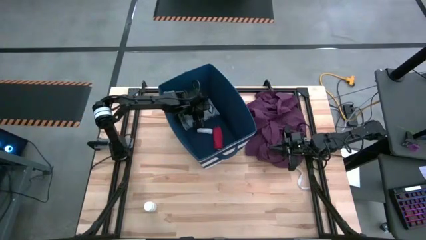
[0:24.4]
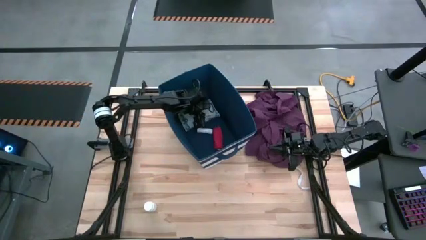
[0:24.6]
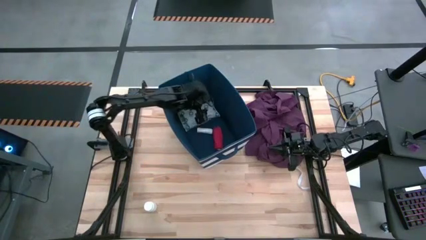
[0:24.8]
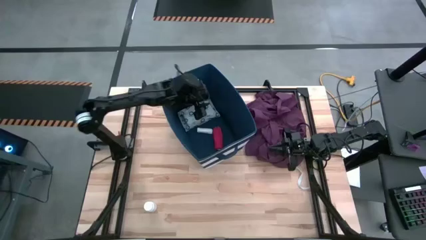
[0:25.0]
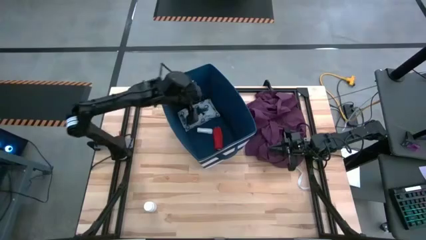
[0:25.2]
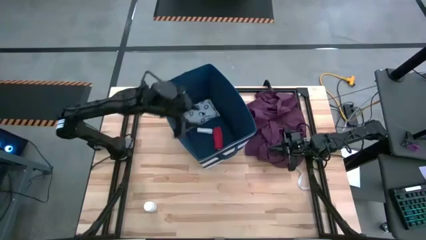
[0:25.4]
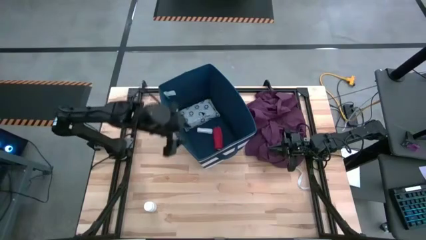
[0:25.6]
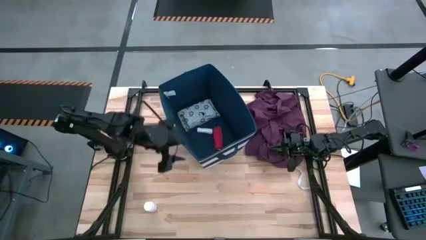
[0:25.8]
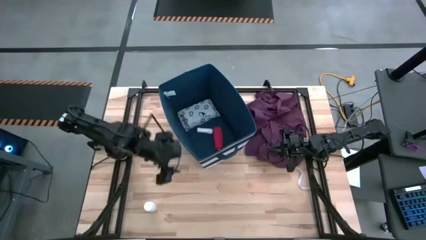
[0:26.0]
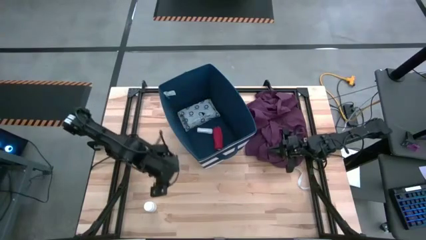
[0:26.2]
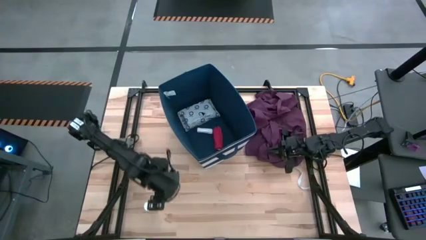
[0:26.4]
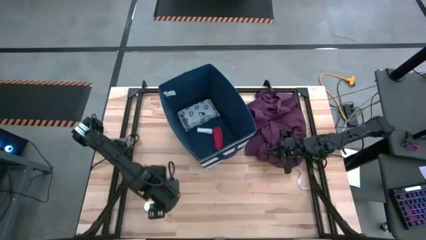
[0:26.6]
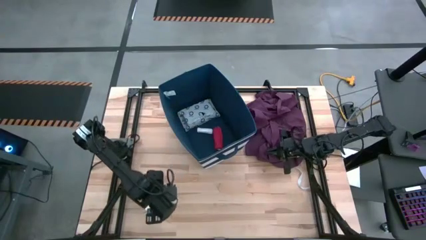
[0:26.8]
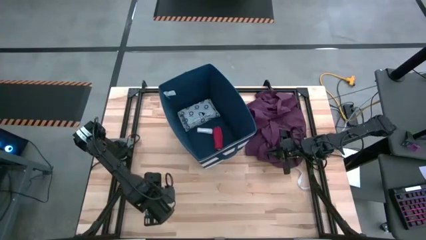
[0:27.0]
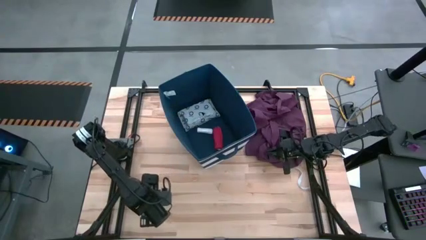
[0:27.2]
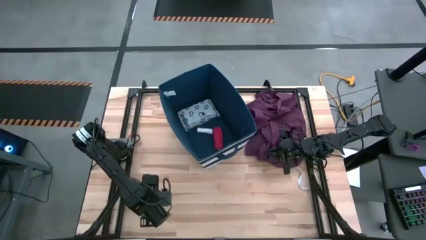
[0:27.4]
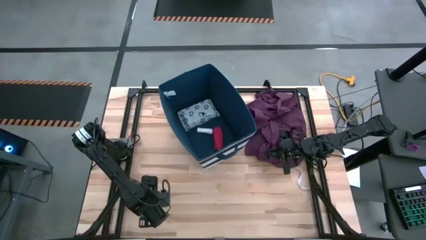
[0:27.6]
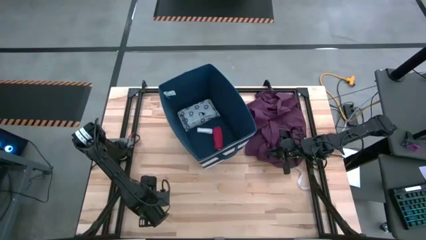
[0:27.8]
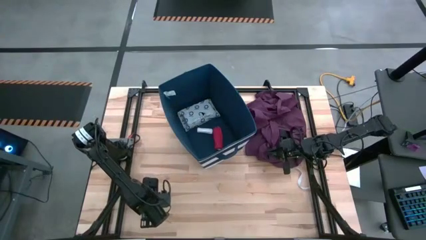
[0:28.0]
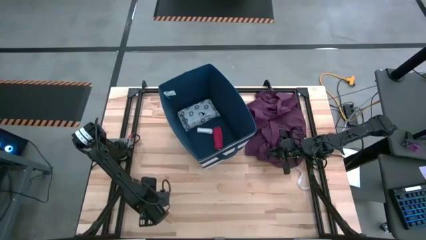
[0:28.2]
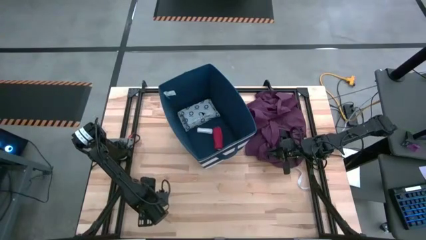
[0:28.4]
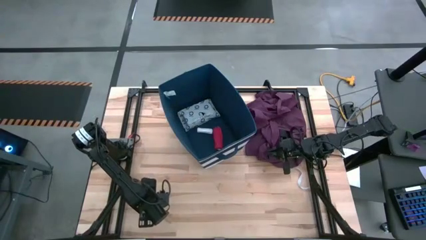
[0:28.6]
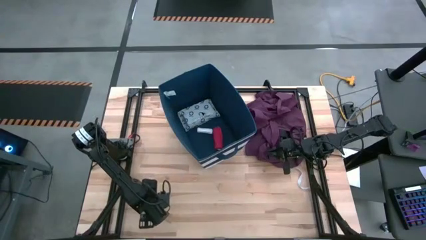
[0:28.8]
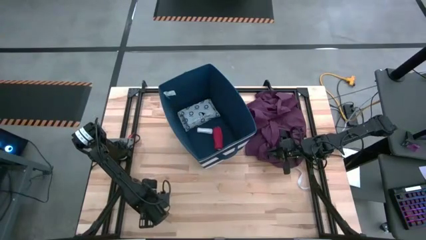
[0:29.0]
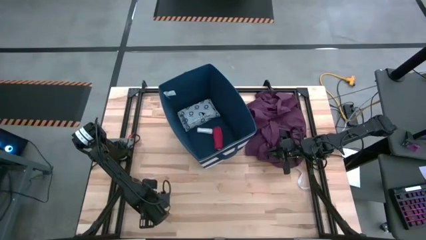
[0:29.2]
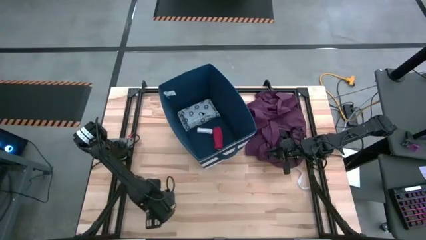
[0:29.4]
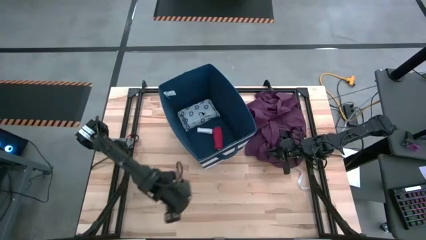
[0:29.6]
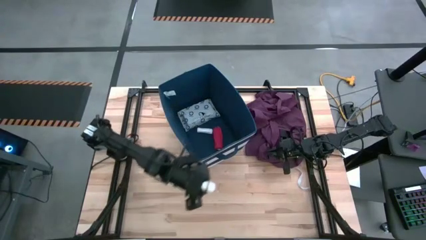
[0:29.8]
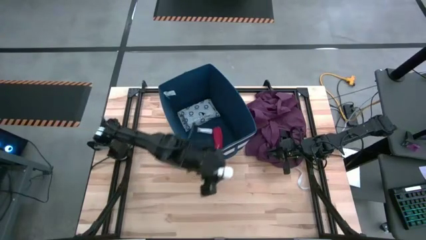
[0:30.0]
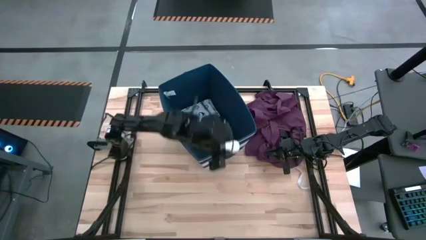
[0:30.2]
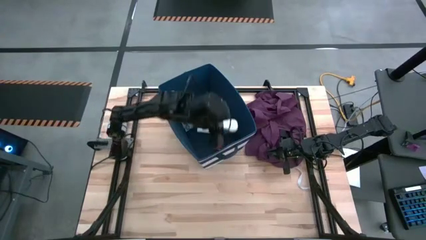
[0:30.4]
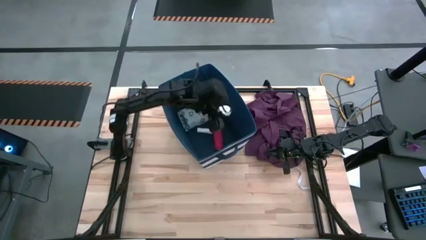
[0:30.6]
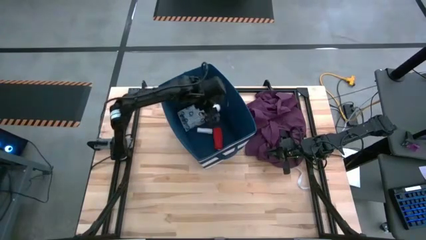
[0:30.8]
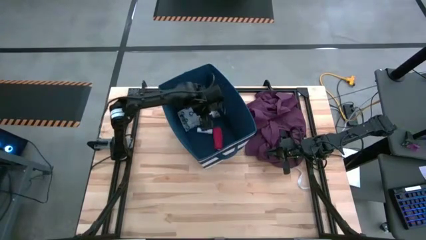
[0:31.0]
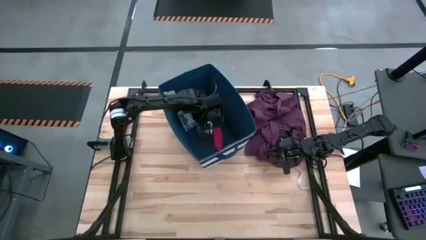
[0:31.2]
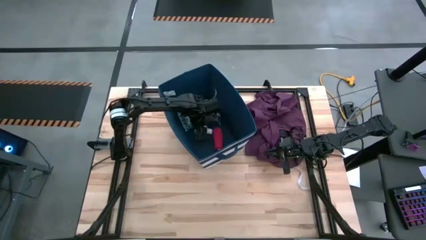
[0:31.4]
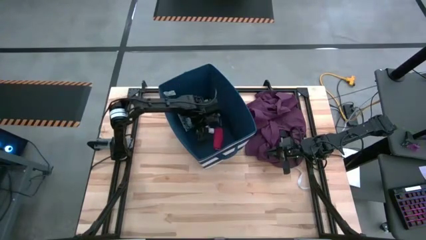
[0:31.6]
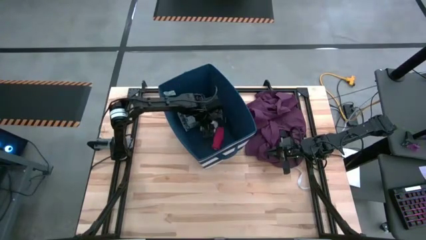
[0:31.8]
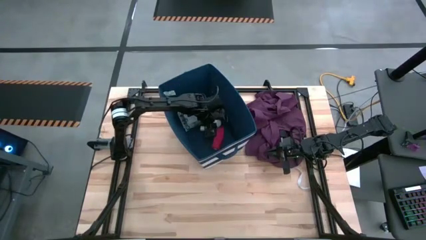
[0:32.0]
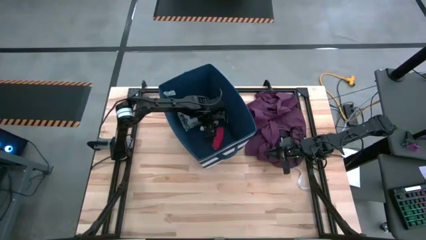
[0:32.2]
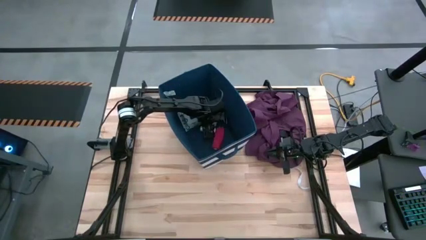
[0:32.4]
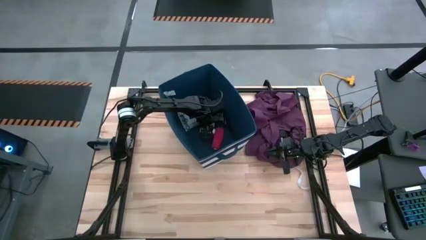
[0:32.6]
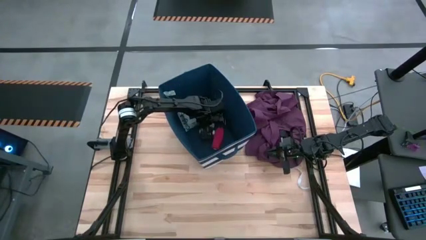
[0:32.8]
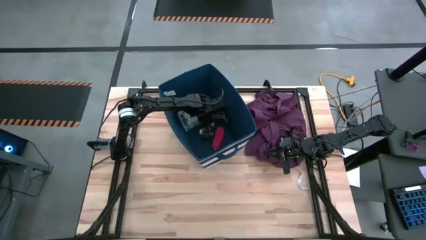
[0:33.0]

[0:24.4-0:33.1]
Task: Pick & place medical supplies in basket/bin
Put the white bottle into the laundry bin

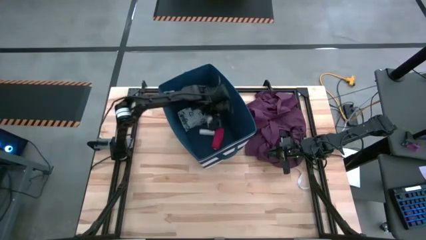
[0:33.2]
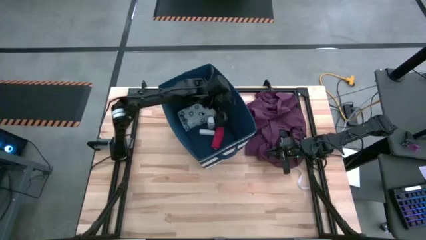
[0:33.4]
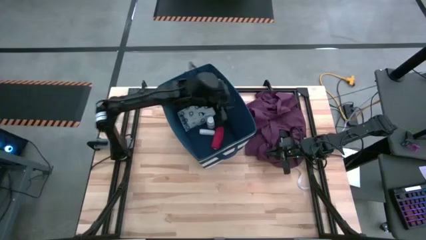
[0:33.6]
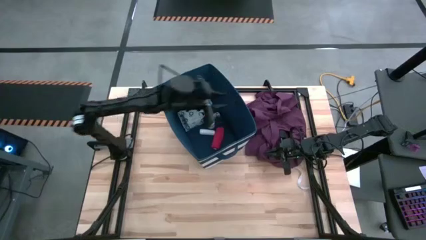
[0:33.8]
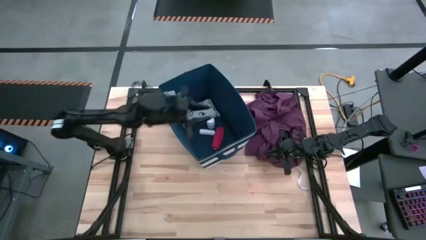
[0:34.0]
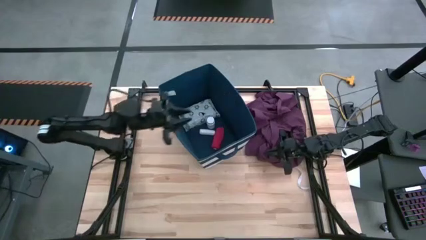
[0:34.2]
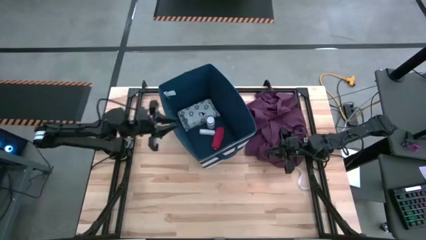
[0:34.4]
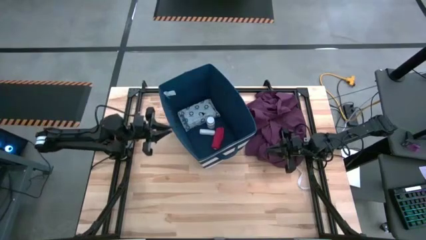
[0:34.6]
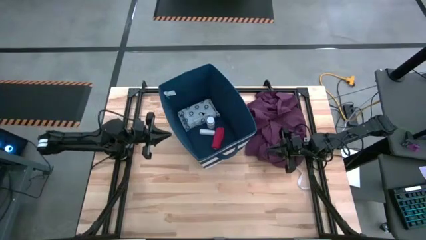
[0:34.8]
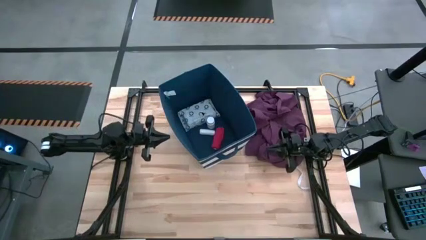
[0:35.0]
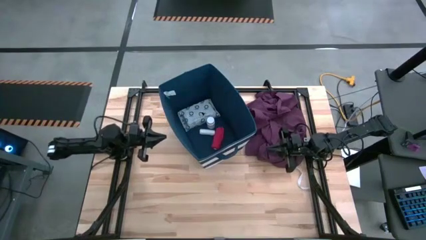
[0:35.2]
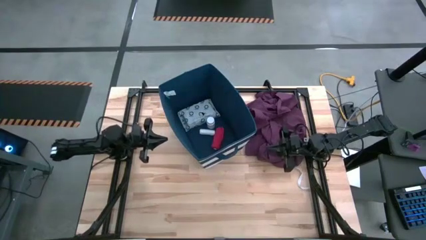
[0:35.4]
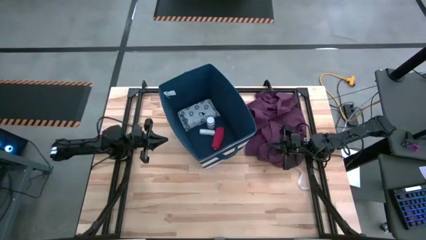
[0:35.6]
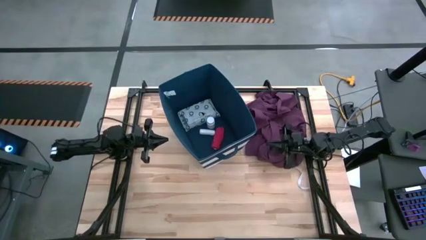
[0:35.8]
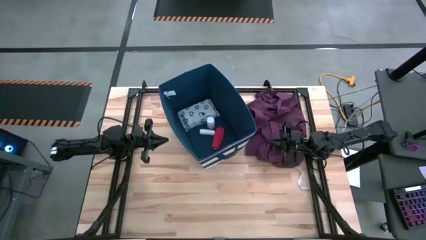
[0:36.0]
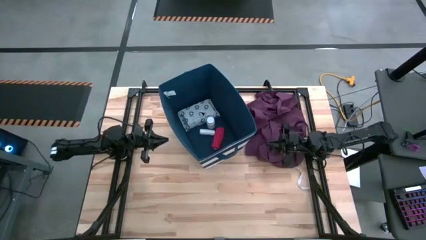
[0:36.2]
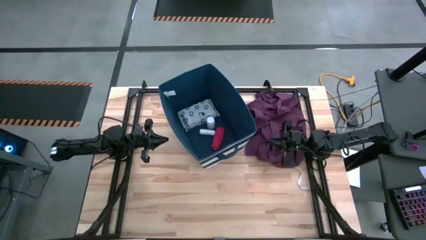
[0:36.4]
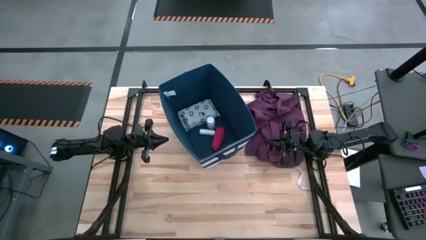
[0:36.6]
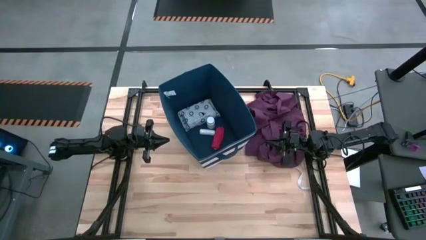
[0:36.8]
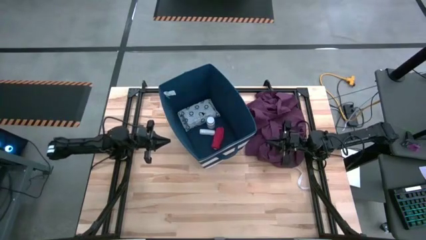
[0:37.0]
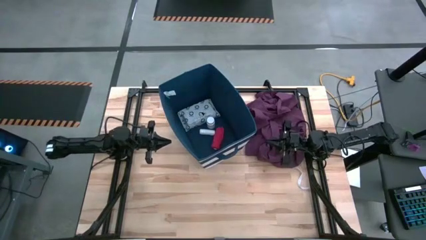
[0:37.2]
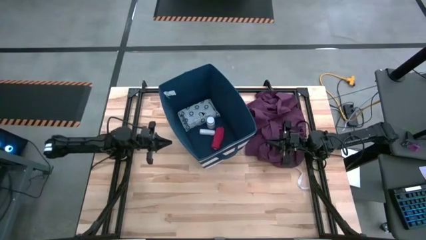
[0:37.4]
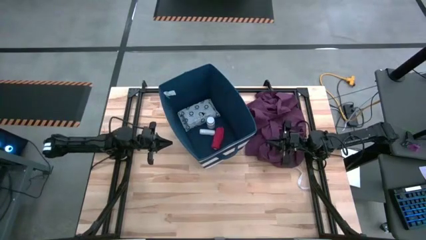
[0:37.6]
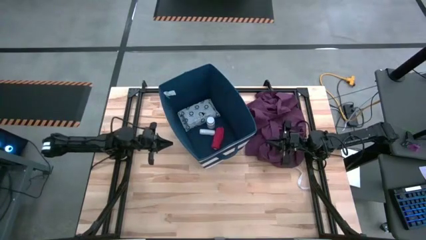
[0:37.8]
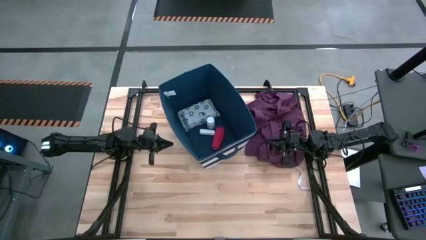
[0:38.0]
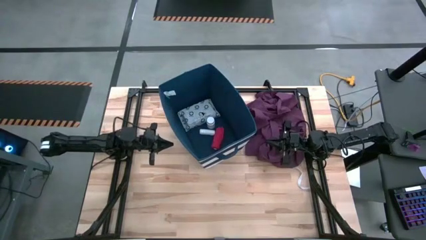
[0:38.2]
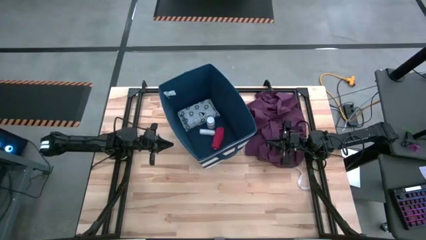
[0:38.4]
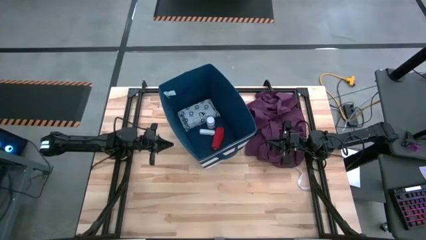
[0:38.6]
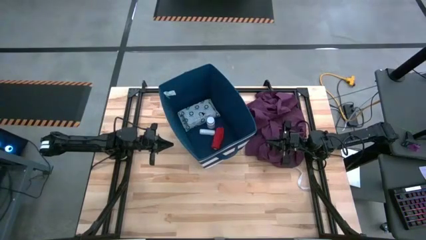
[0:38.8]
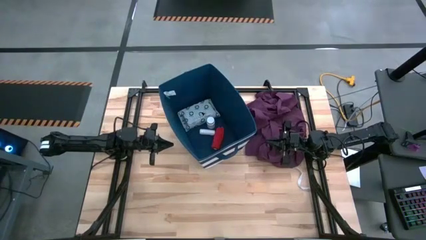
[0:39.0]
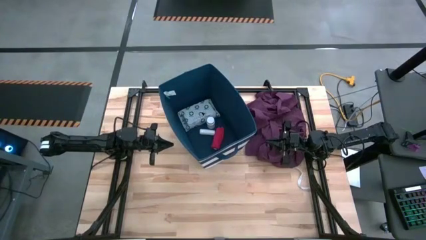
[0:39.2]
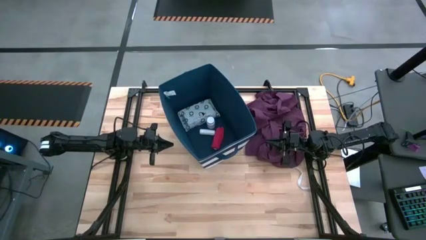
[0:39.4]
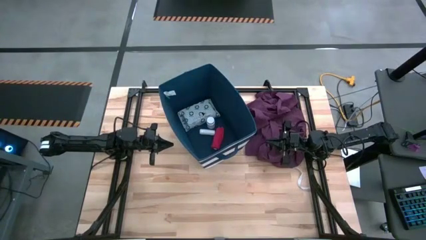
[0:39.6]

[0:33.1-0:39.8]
Return to Home Position

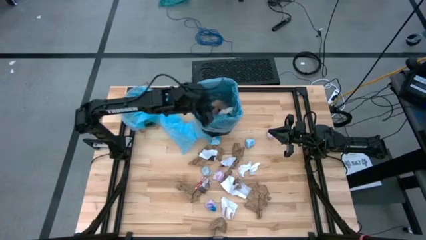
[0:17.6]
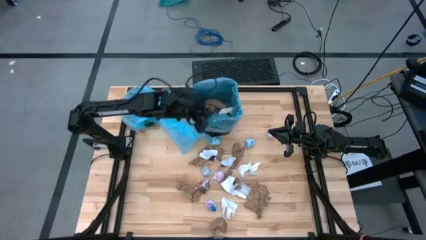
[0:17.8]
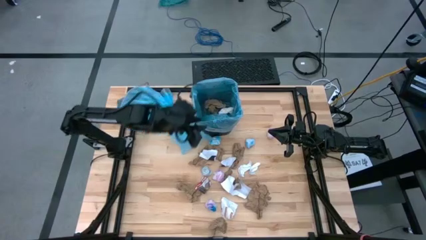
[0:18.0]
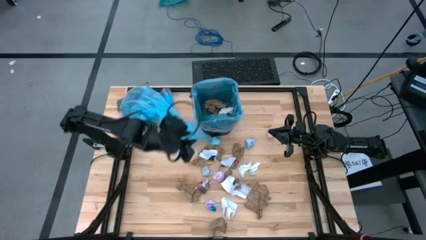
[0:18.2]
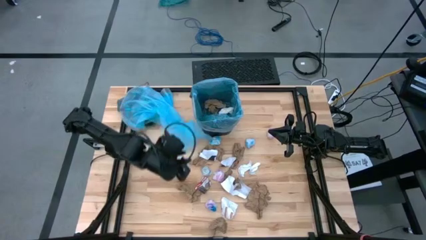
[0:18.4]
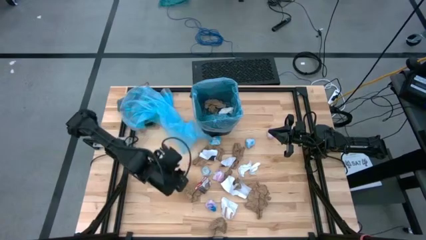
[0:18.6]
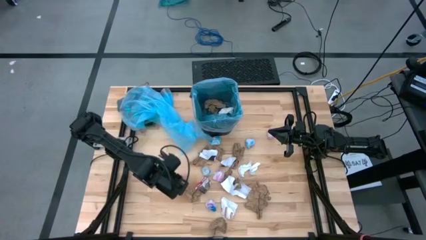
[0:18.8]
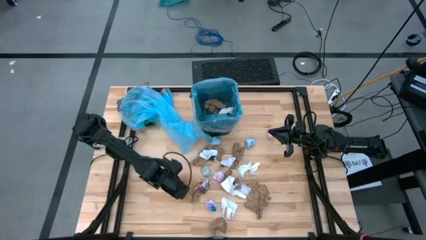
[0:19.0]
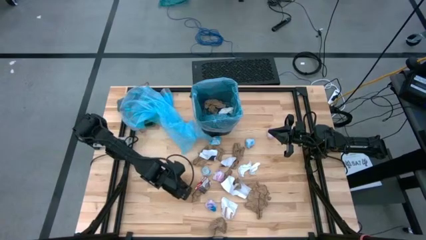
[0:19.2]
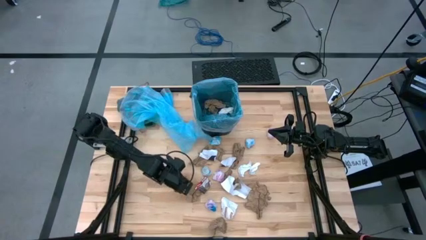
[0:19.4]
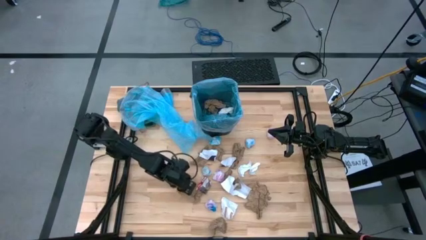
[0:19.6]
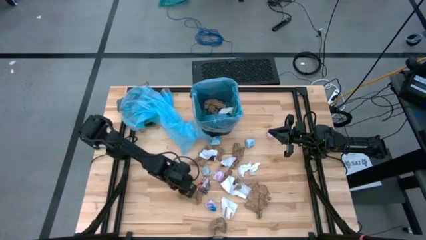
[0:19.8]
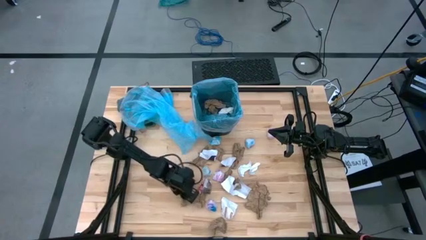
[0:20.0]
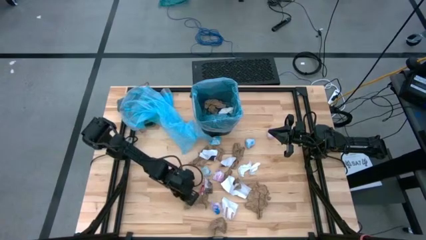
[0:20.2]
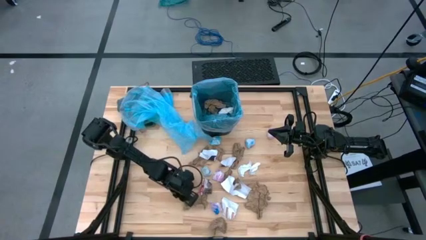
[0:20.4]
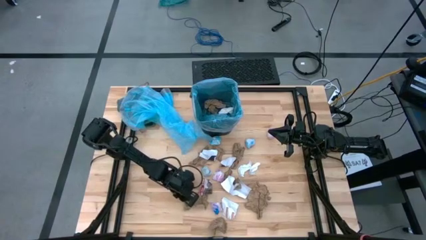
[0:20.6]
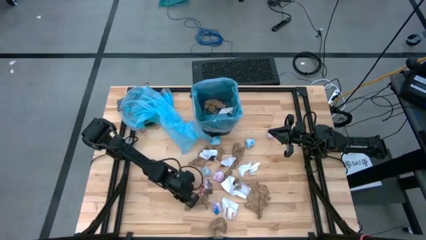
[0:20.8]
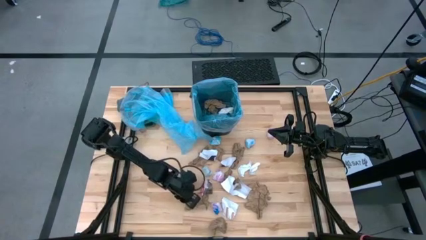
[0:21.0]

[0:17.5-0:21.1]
Task: place trash/remove bag and relplace
Put the brown paper into the trash bin
